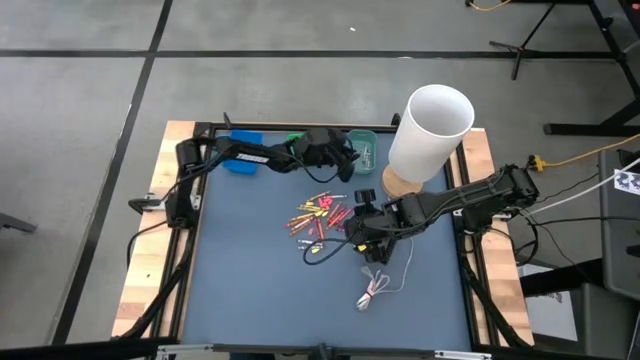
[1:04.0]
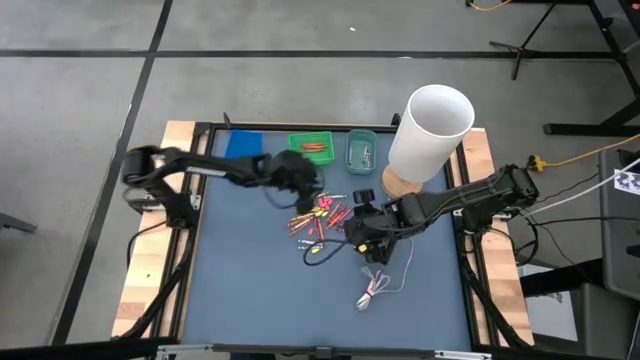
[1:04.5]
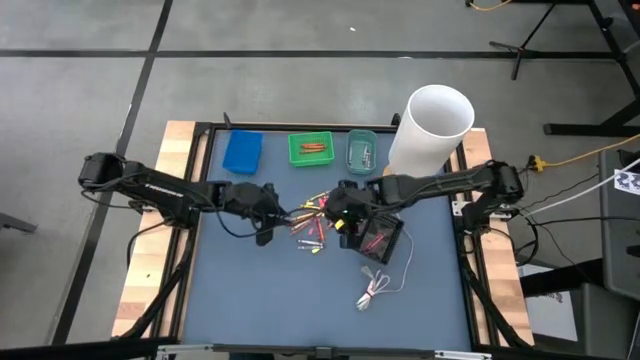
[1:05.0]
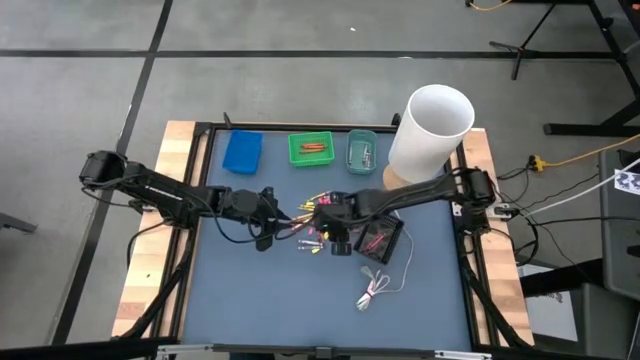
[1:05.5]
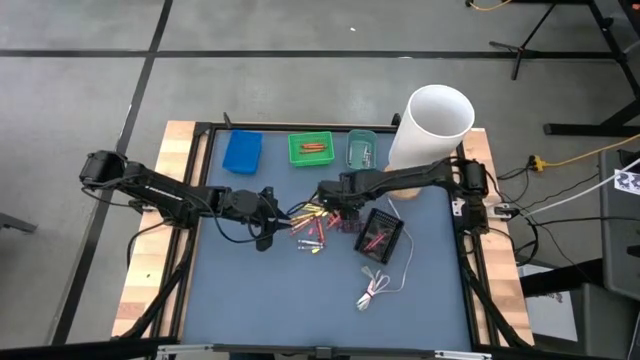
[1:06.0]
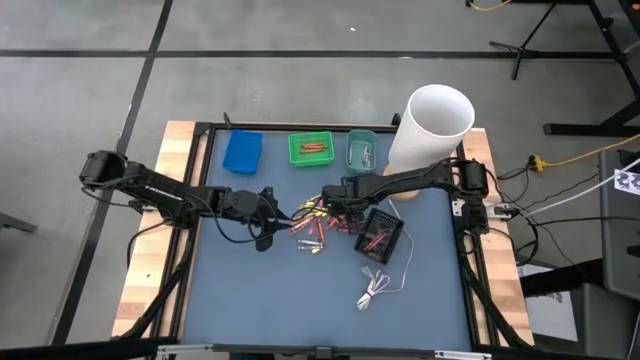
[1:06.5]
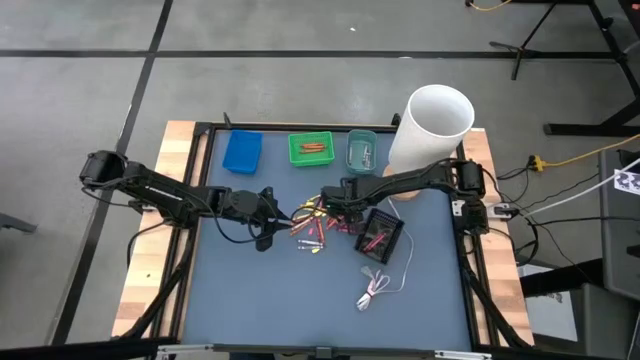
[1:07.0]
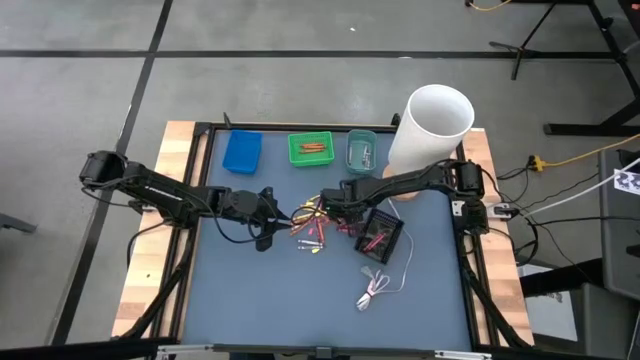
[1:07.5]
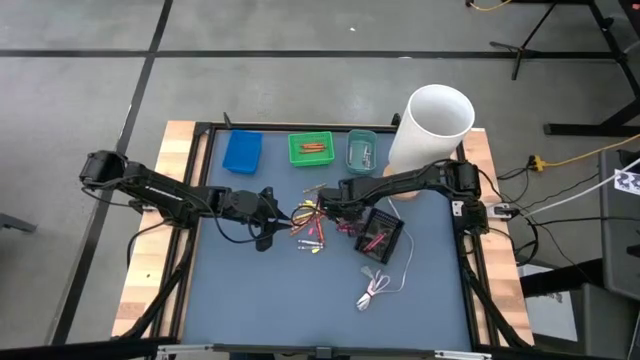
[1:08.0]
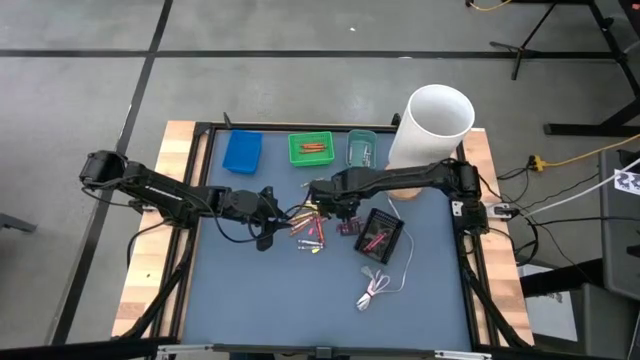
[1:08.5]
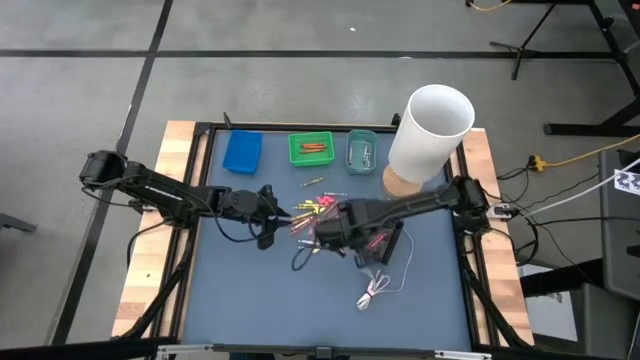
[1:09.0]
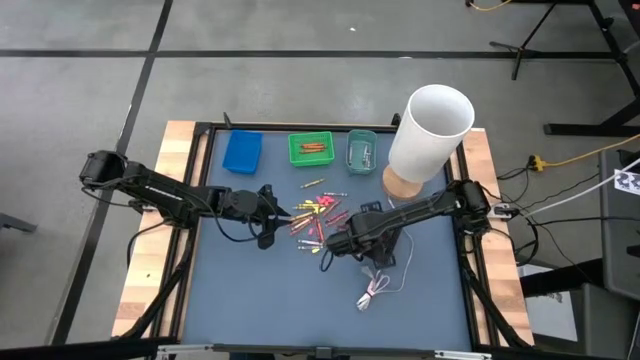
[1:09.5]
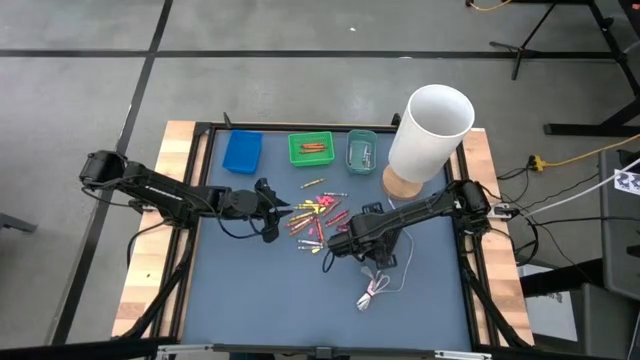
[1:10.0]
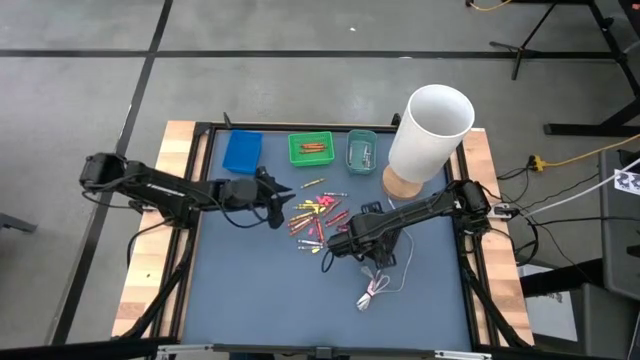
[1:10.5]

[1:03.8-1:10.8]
Task: Sort crayons
Put the red crayon into the black bin

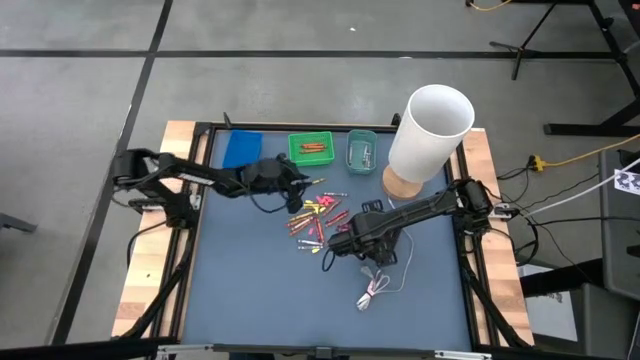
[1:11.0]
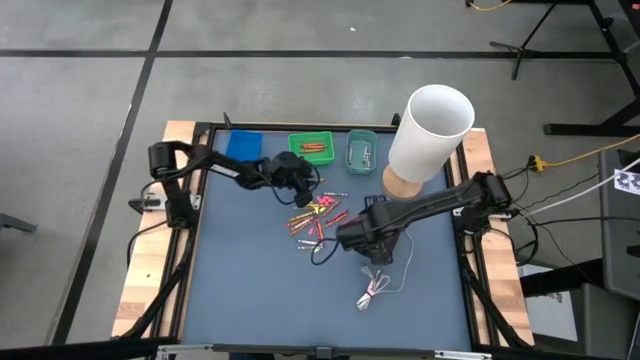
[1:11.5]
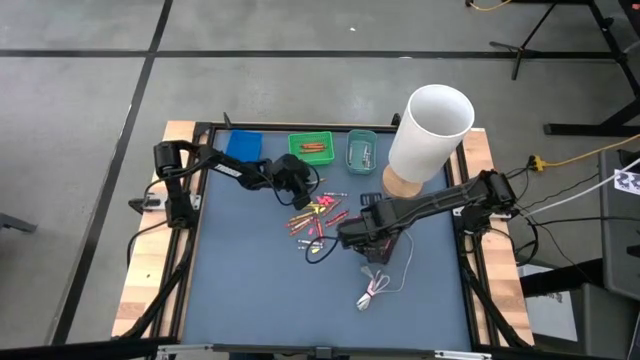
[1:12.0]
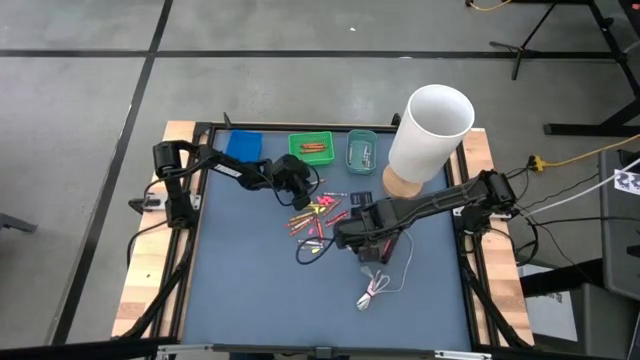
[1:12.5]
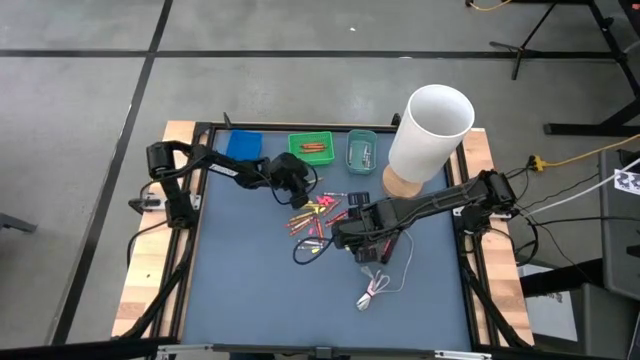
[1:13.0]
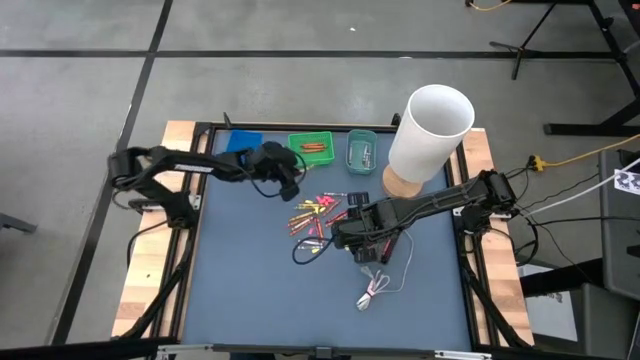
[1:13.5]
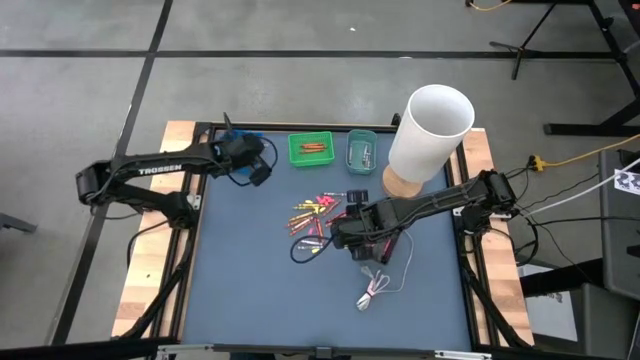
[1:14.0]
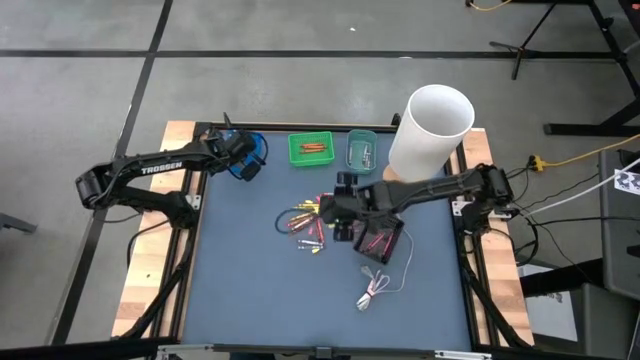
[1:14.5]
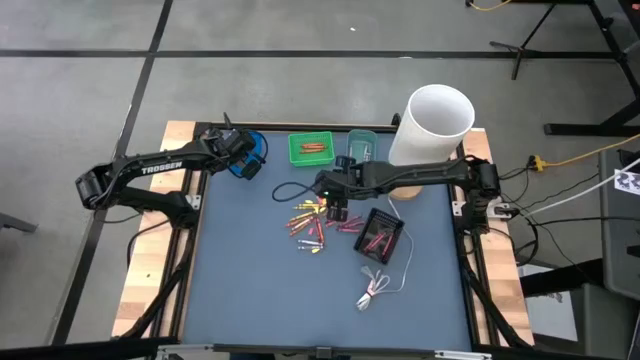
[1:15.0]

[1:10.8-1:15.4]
Put the yellow crayon into the blue bin

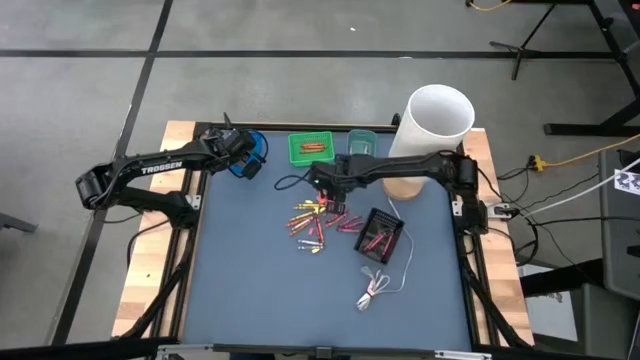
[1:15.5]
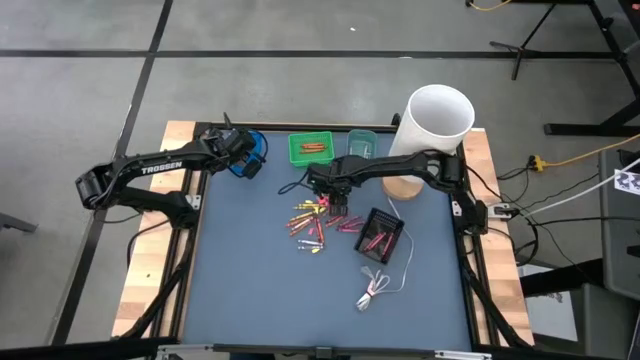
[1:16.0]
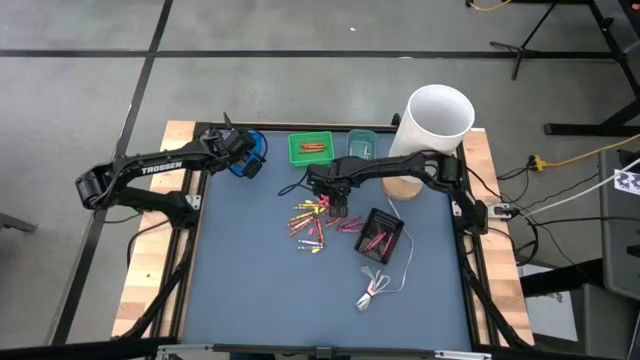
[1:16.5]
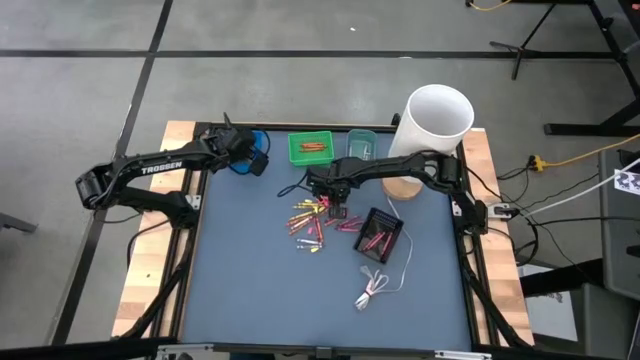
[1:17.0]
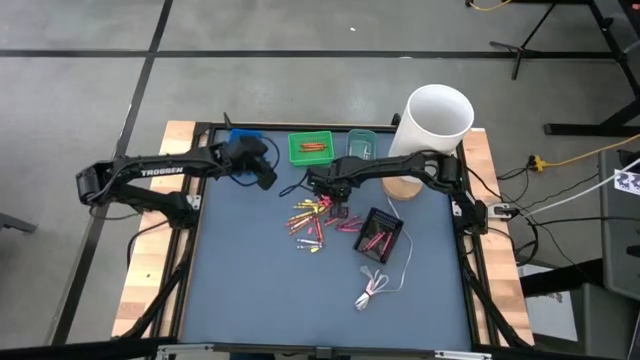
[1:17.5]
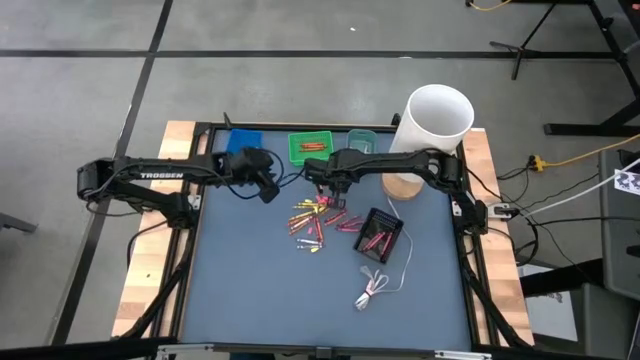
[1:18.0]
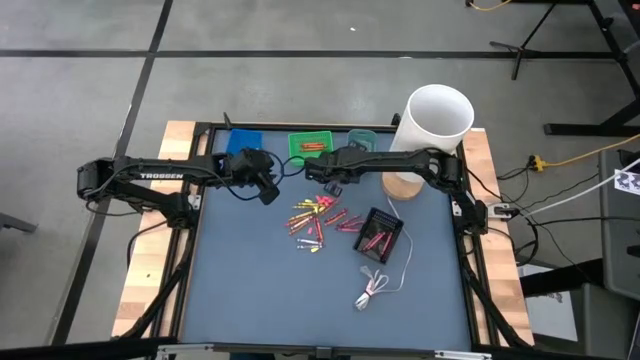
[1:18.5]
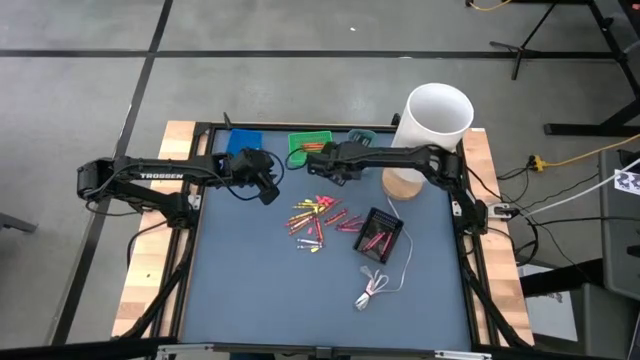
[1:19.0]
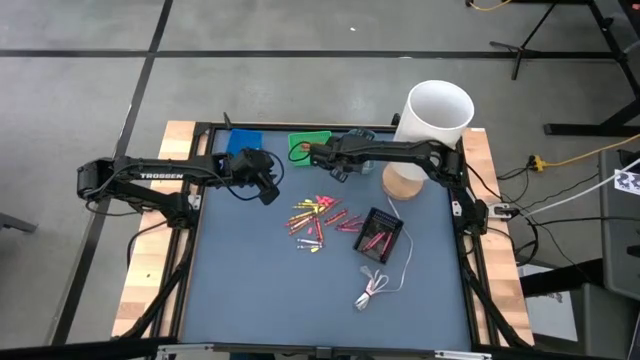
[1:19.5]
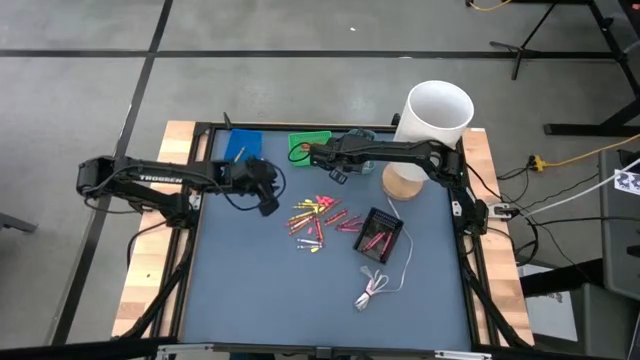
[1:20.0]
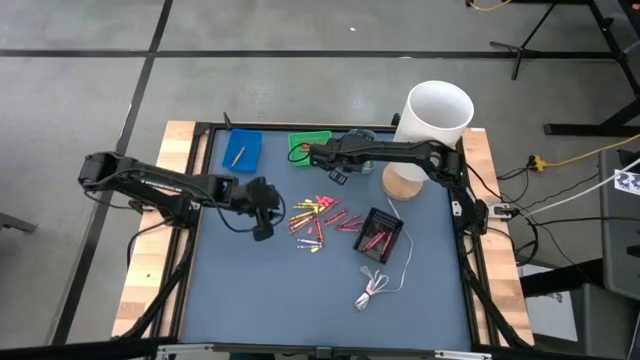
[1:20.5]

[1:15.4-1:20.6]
Put the gray crayon into the dark green bin

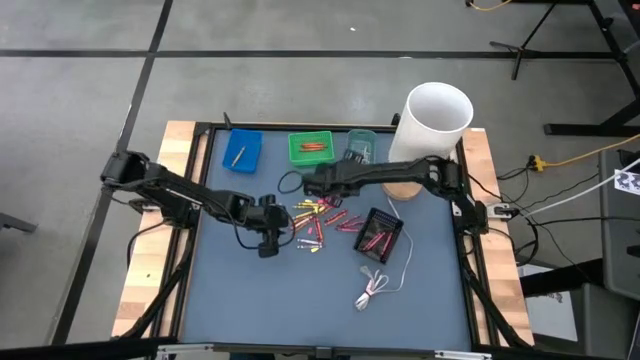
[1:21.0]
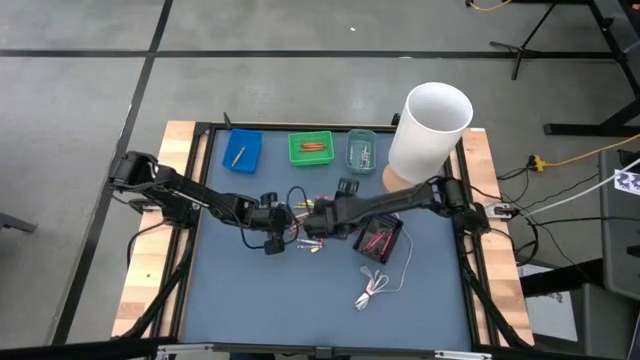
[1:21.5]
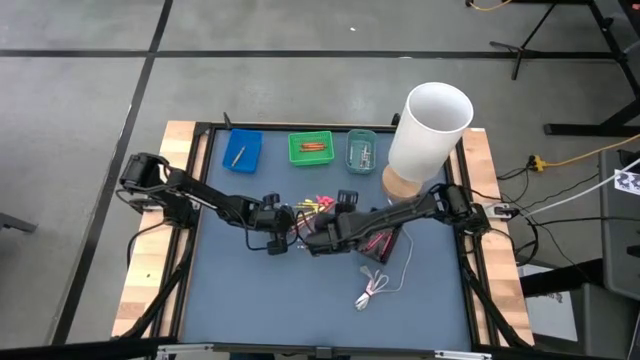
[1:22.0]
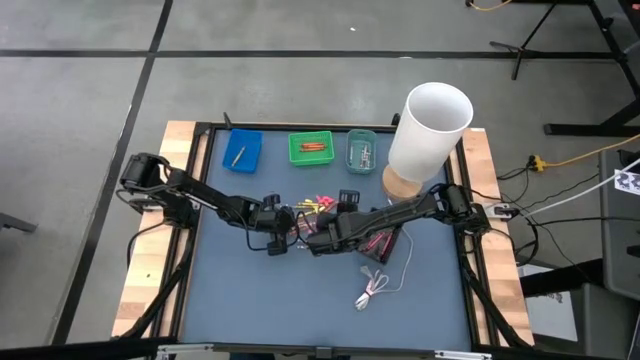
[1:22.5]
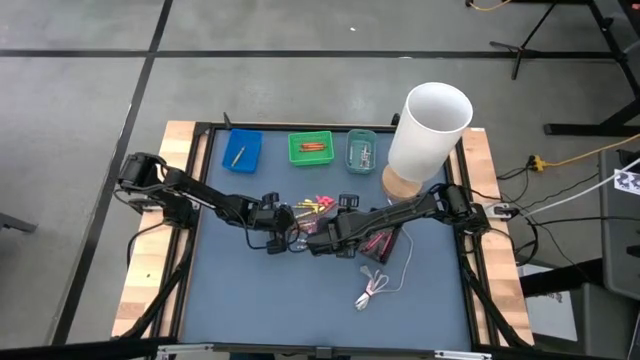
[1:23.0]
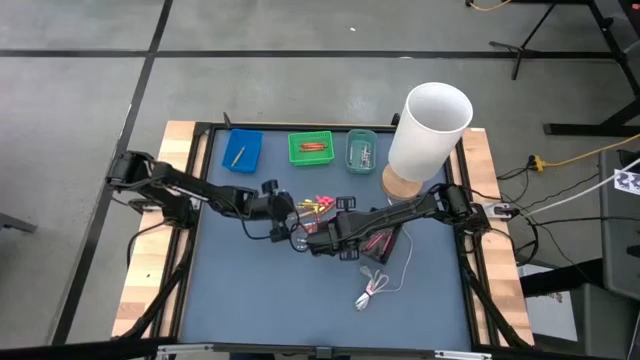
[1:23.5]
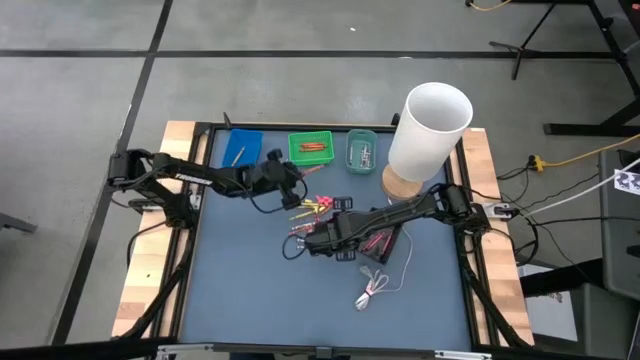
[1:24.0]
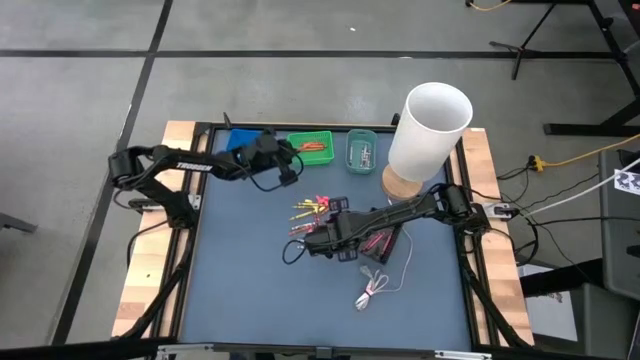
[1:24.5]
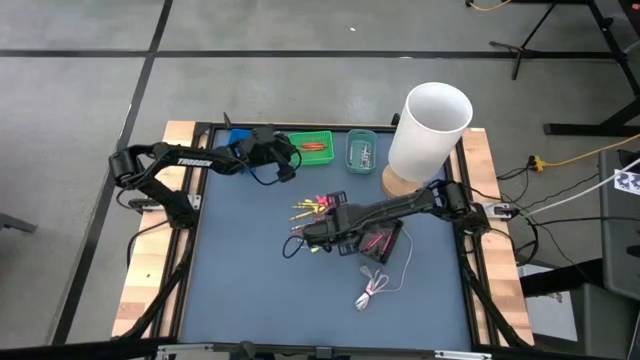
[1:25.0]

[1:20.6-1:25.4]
Put the orange crayon into the green bin
